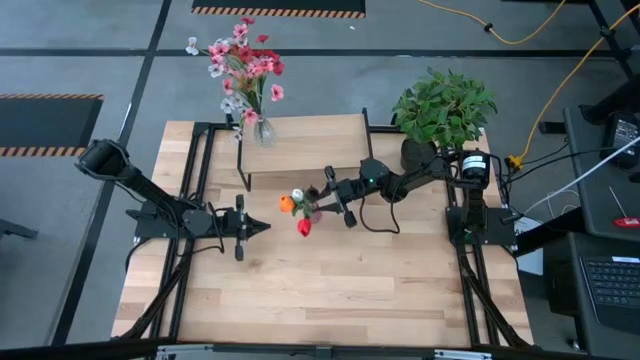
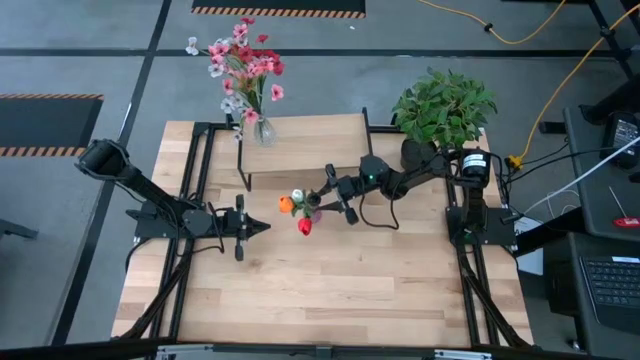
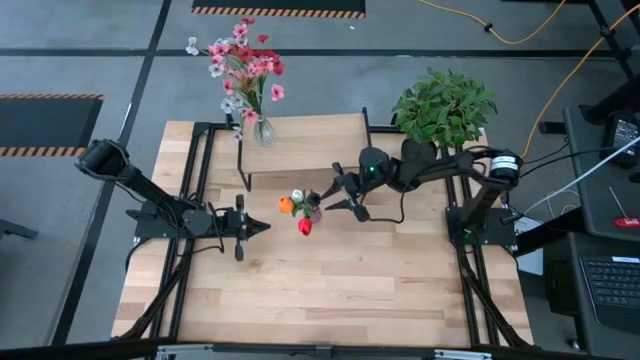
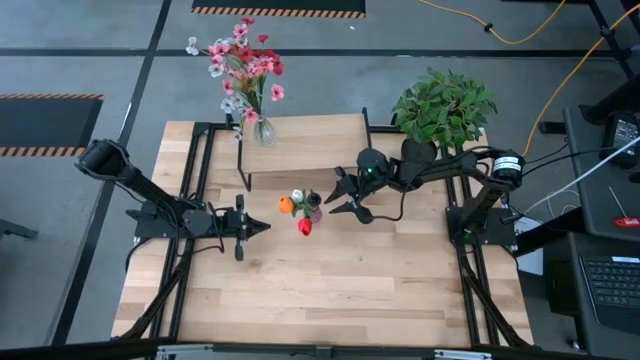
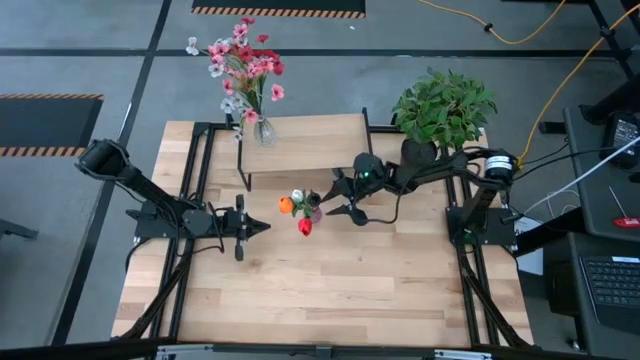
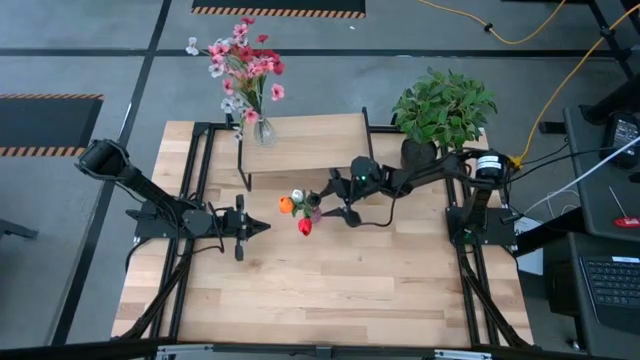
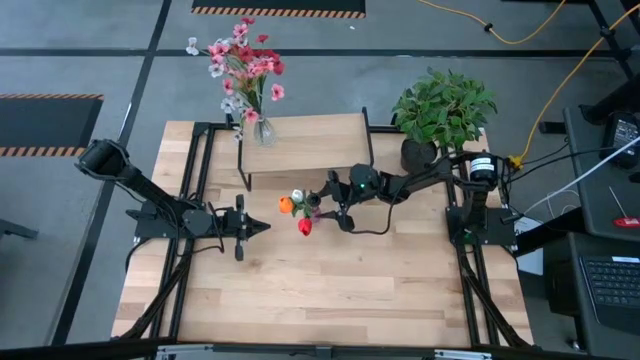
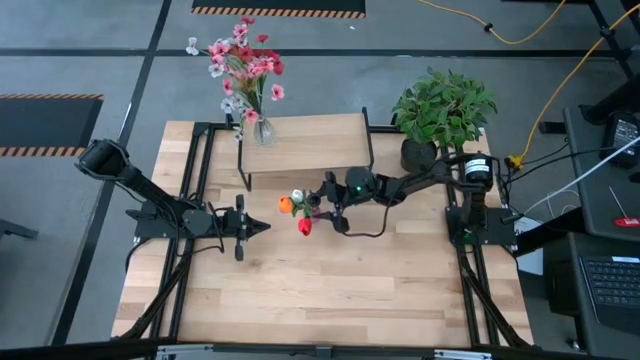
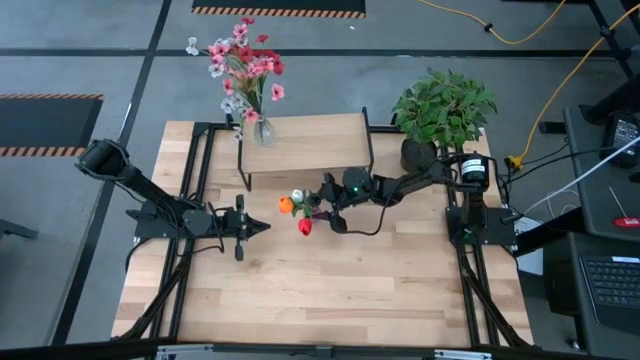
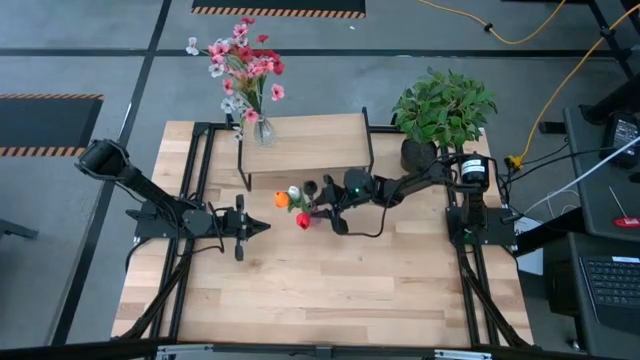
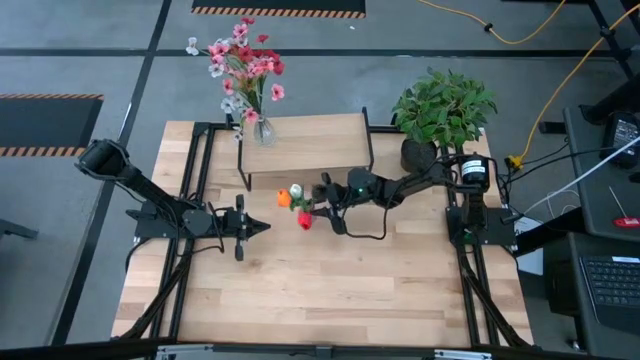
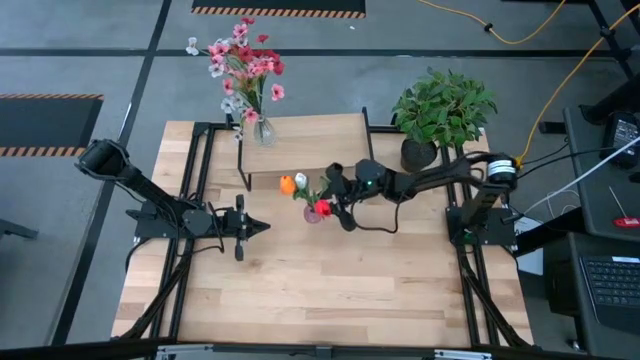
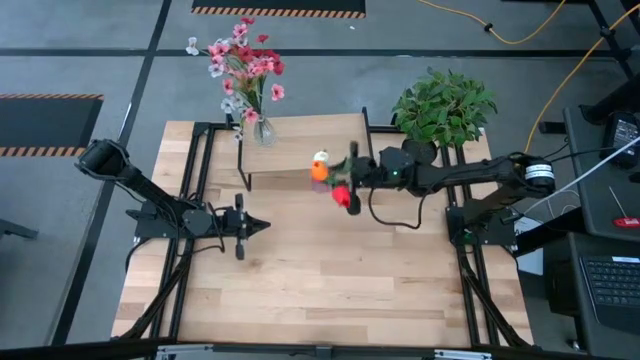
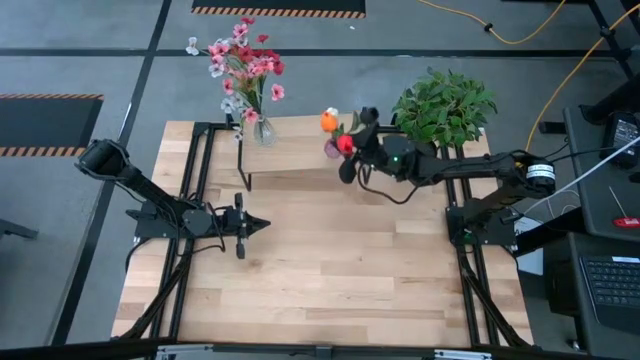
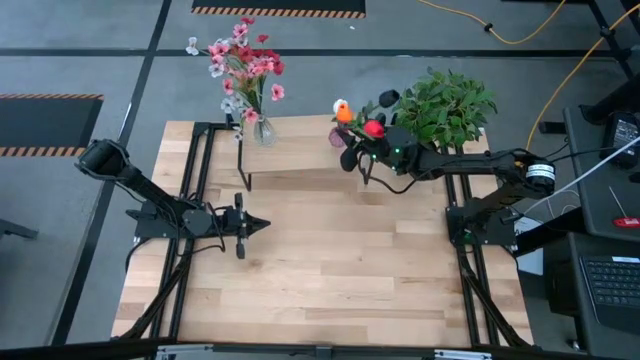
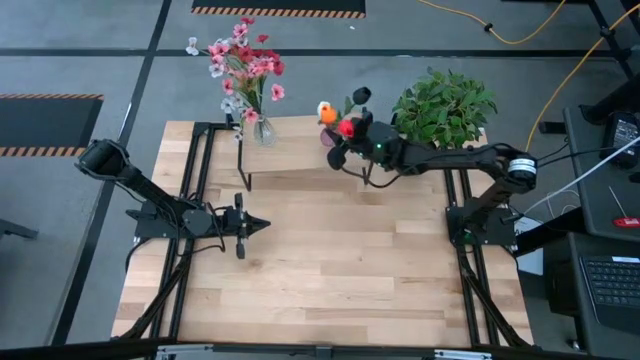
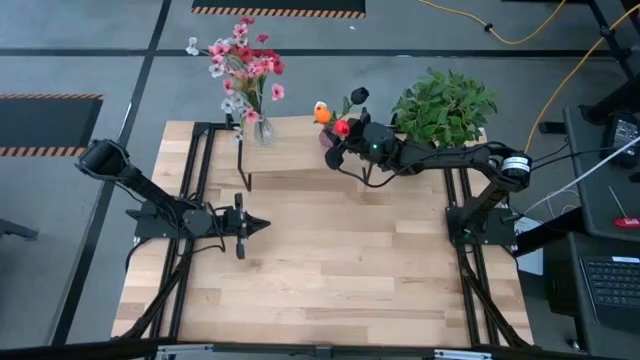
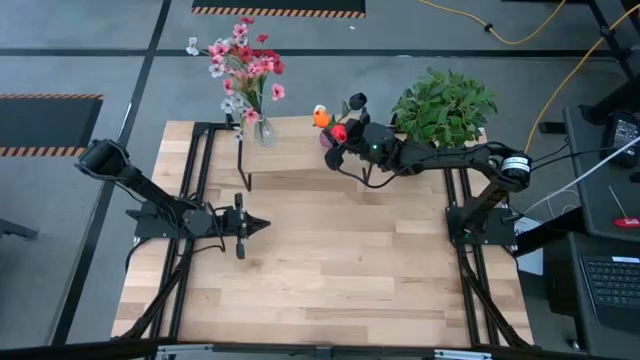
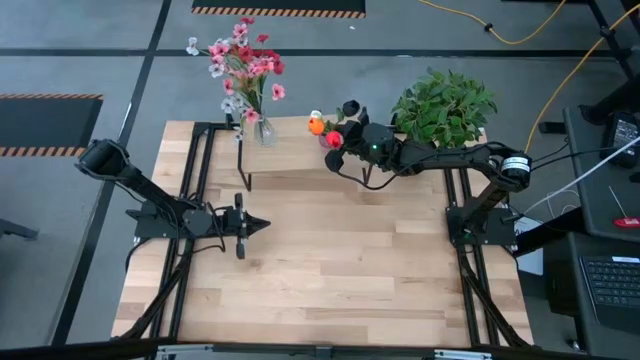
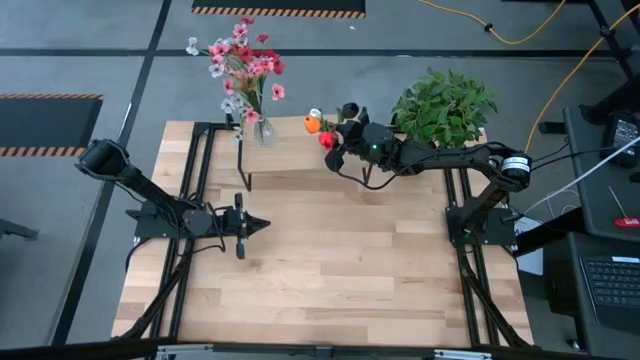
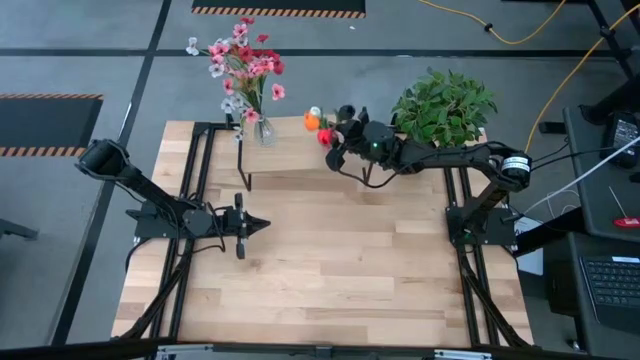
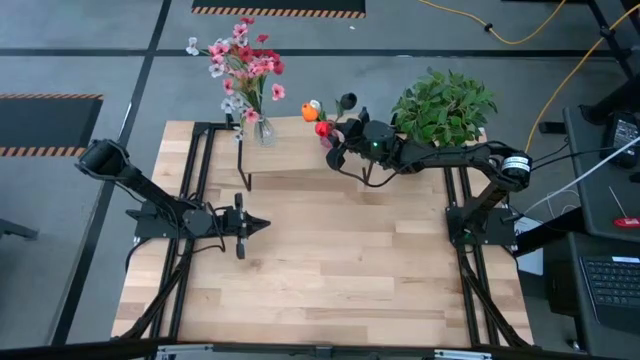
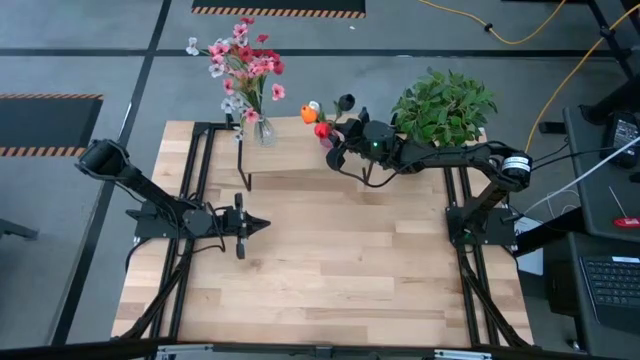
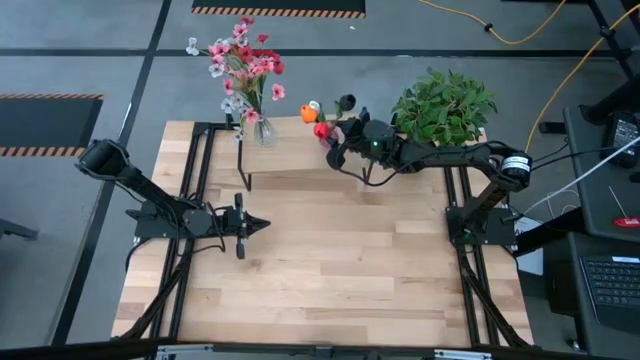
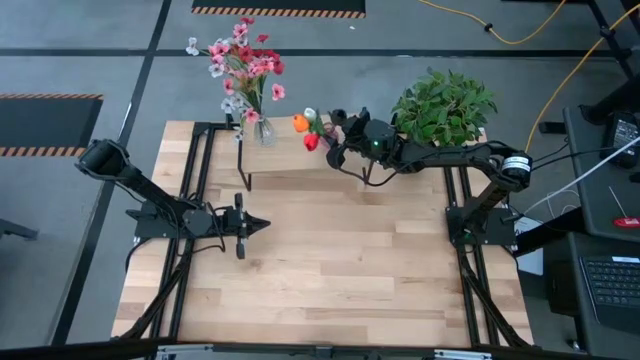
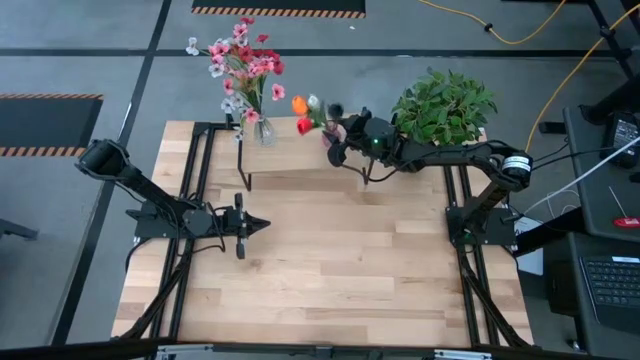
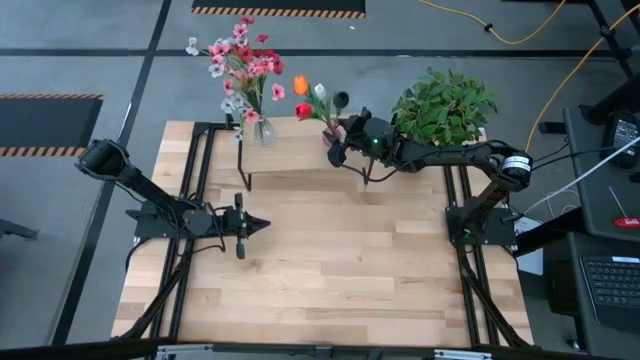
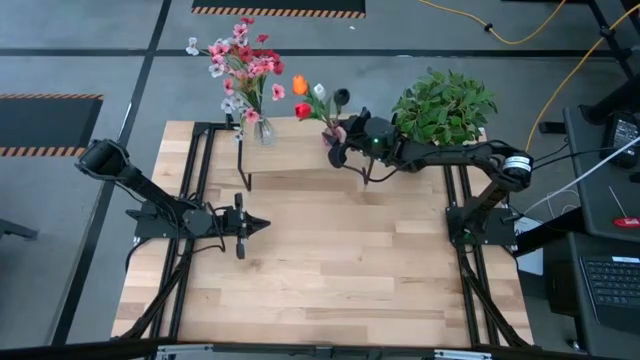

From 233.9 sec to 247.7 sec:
Task: Pick and place flowers into a vace then onto a shelf
Put the pink vase on the shelf

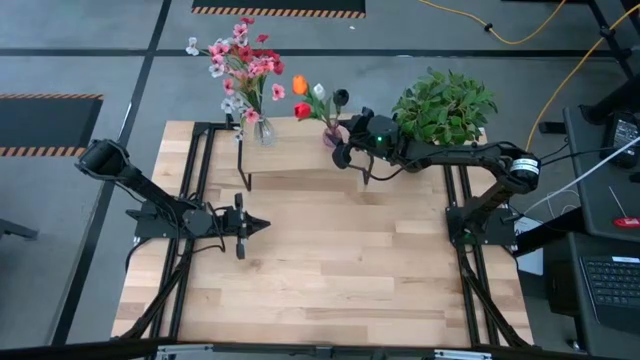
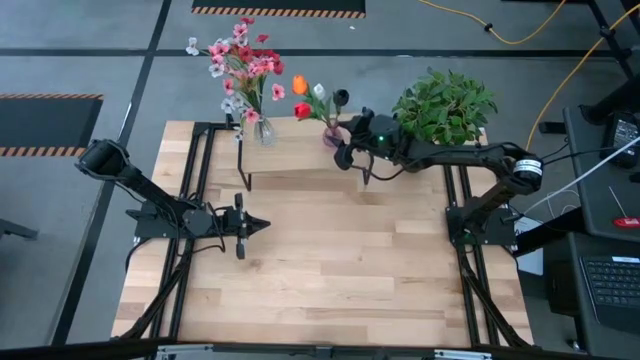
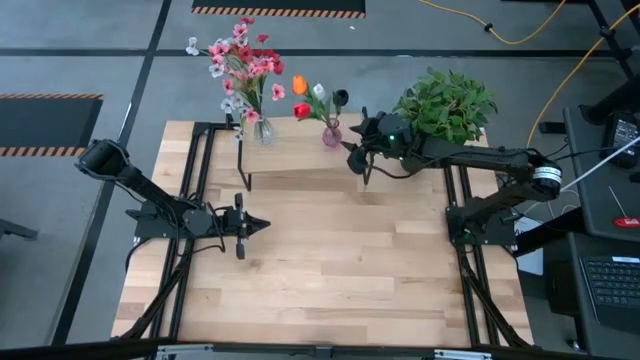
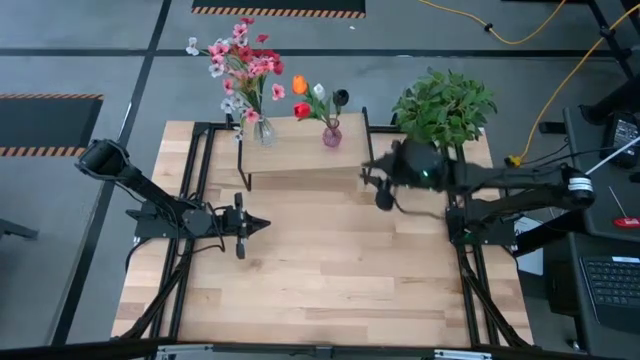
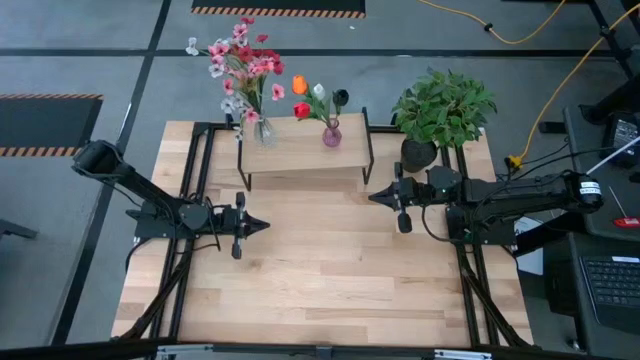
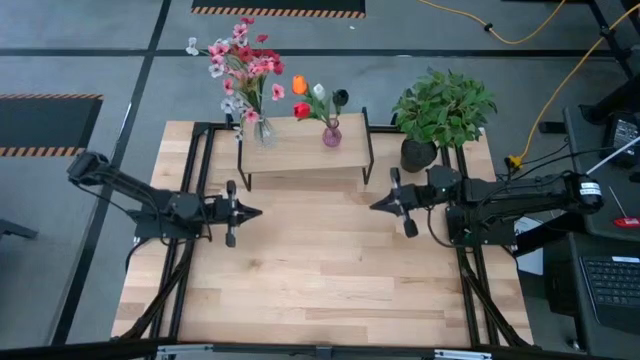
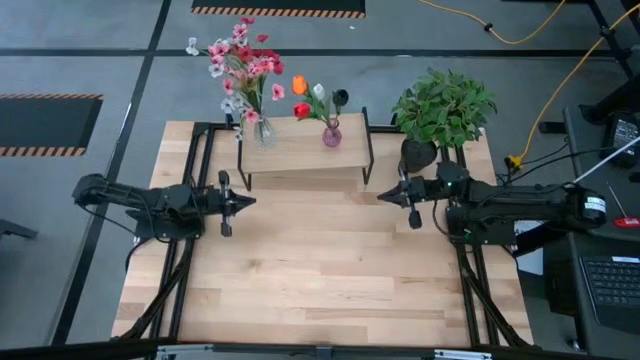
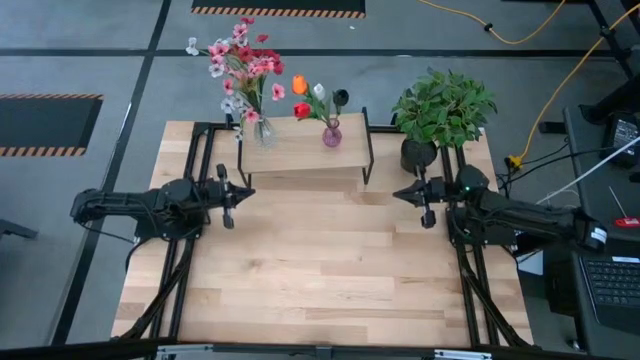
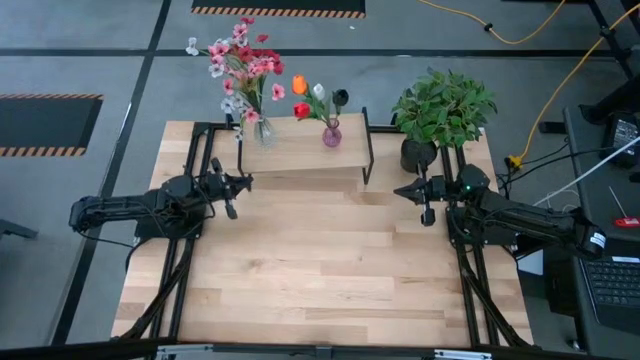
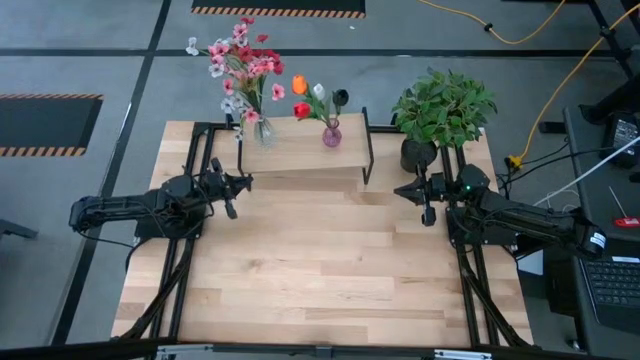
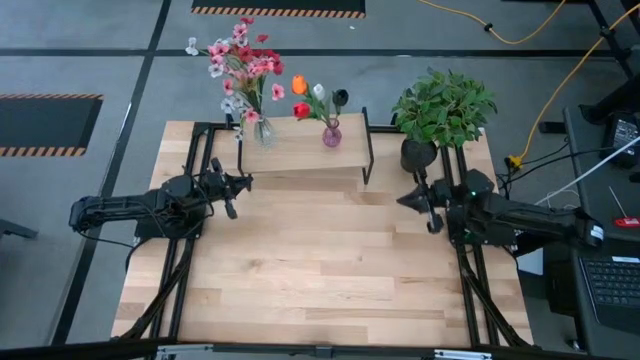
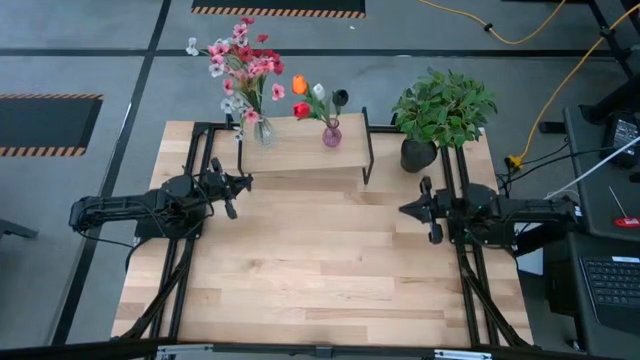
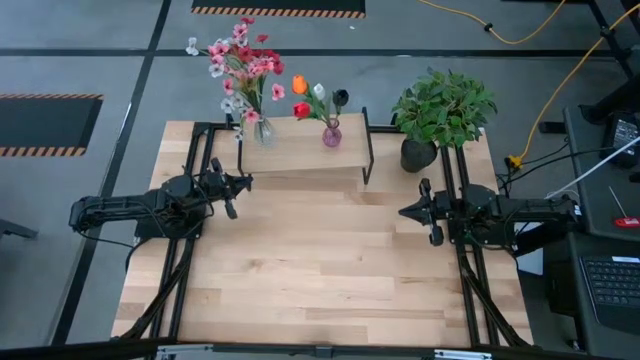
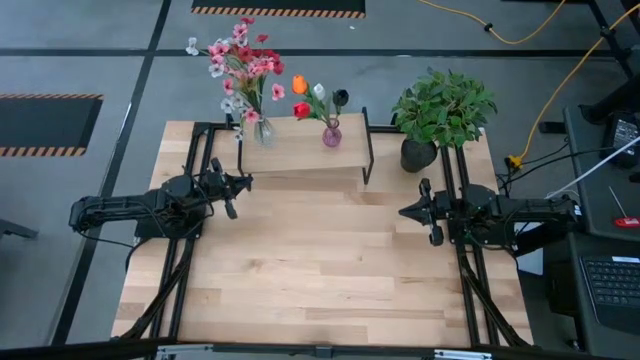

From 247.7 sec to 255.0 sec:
Return to Home Position
